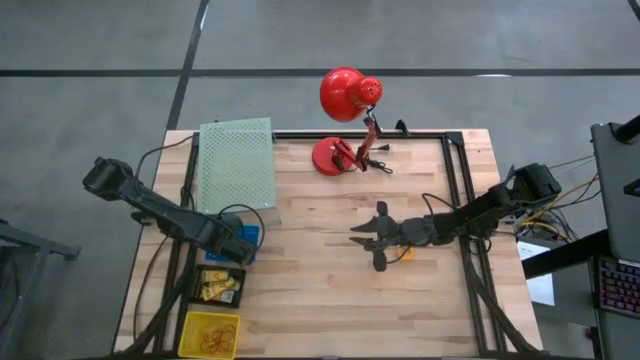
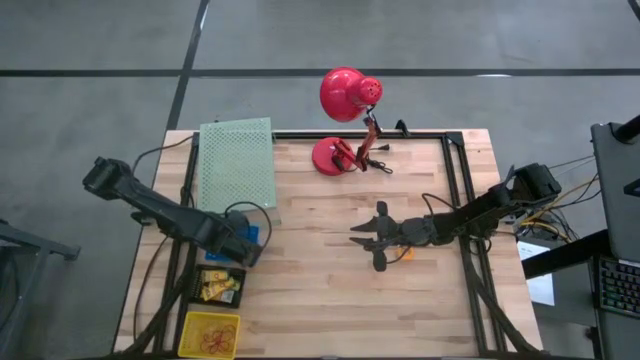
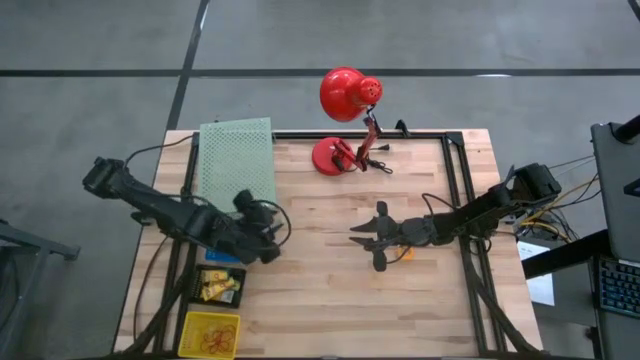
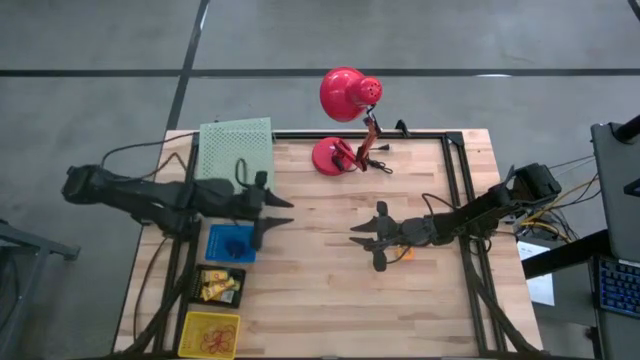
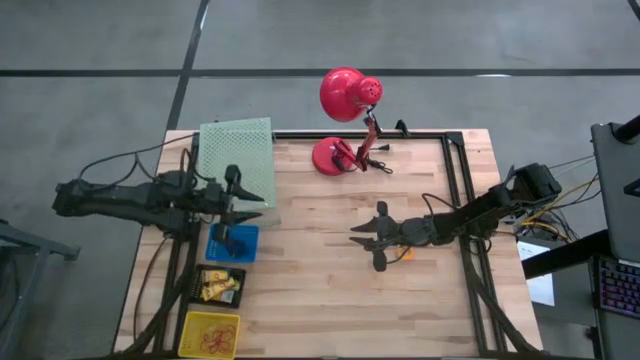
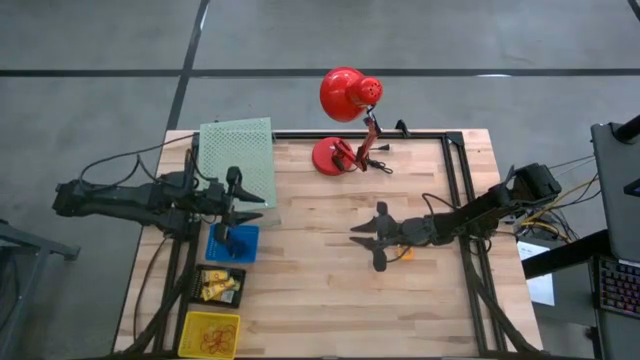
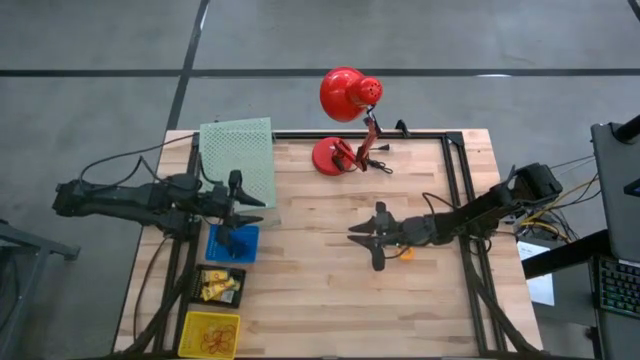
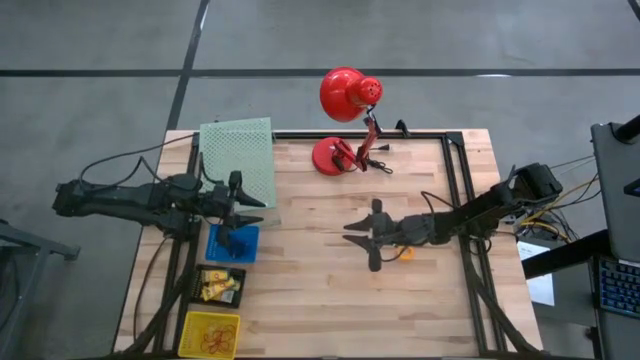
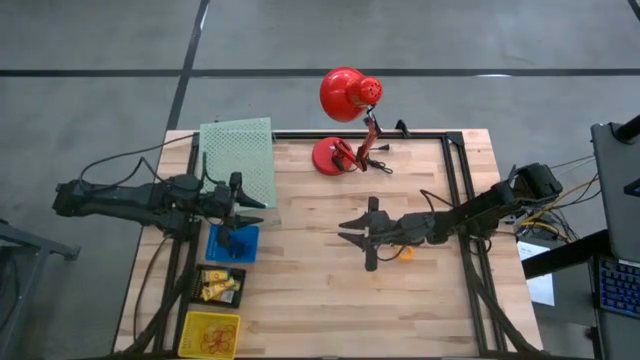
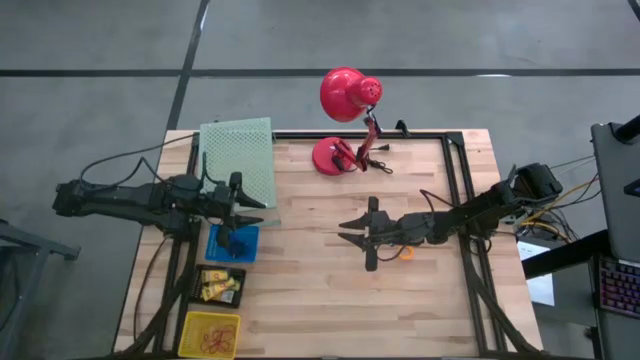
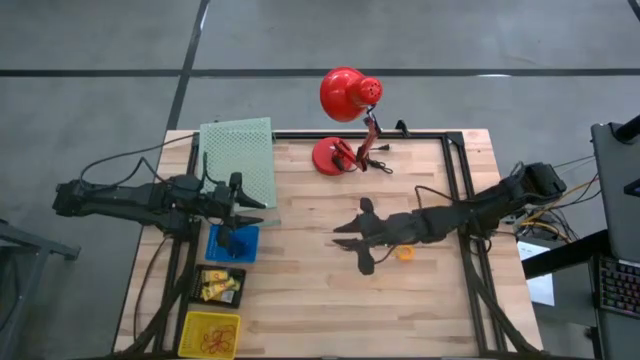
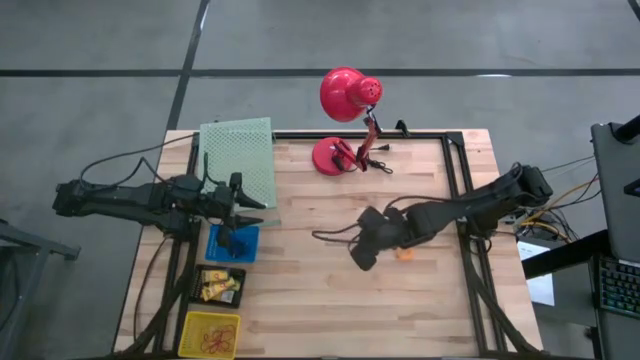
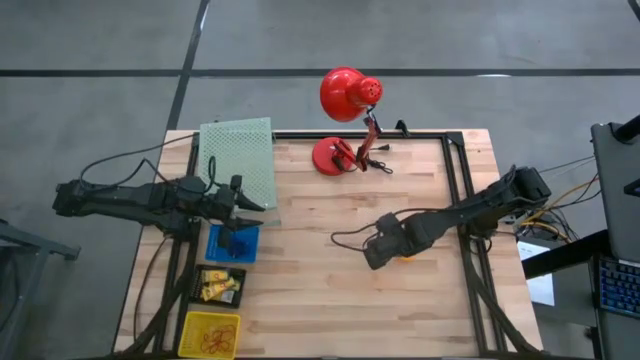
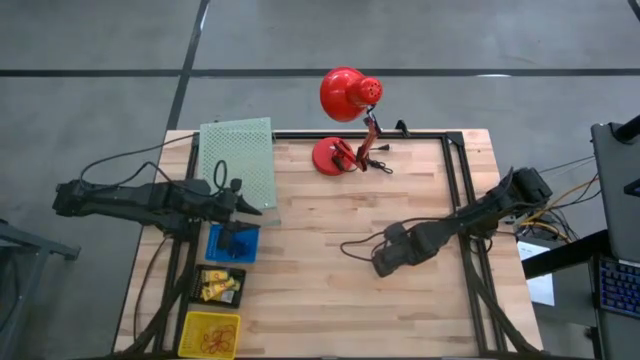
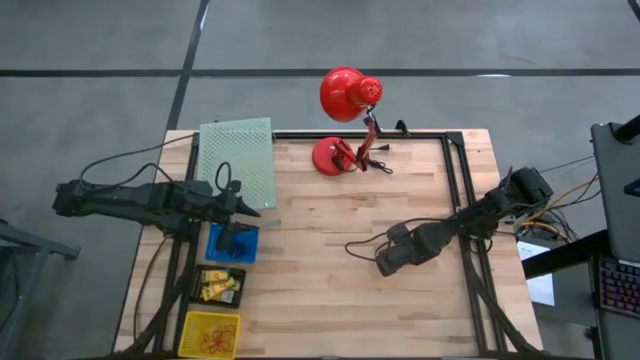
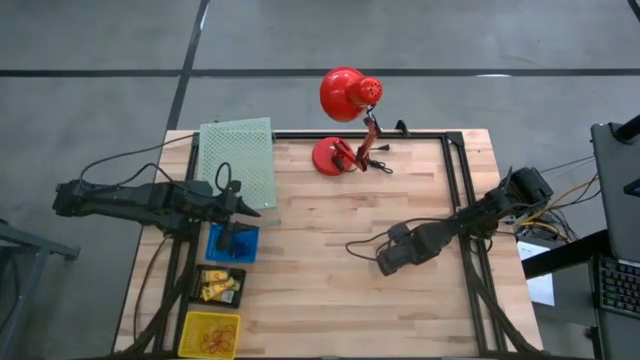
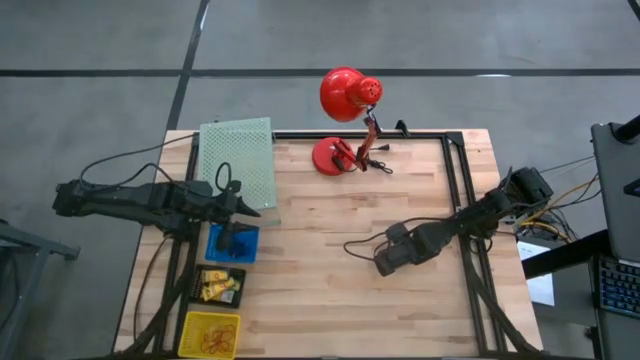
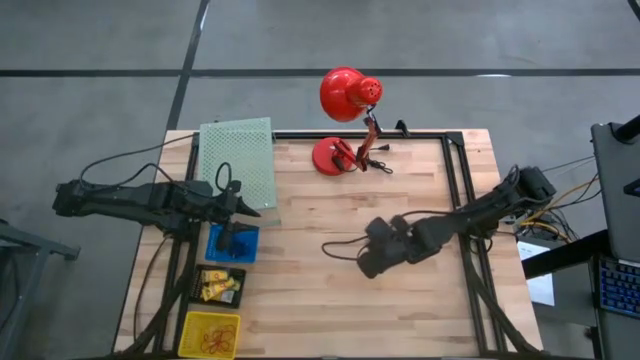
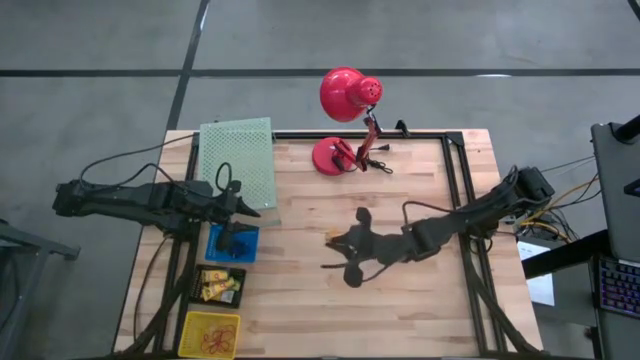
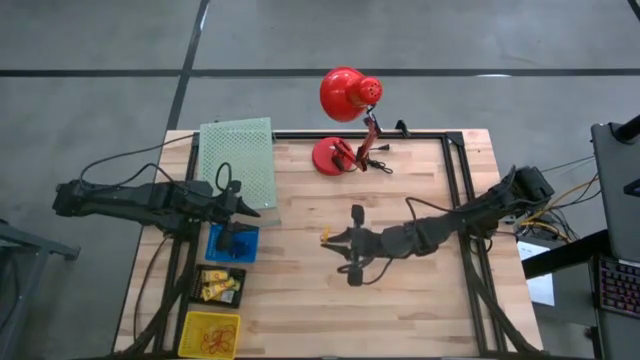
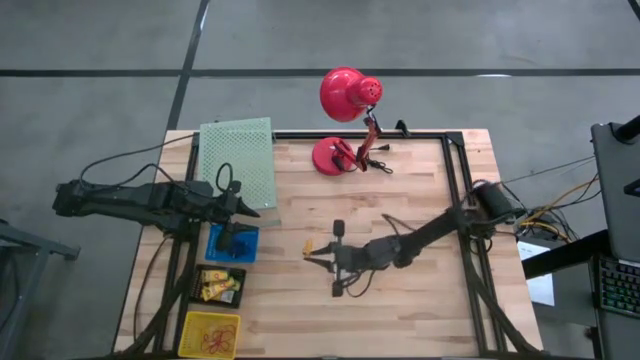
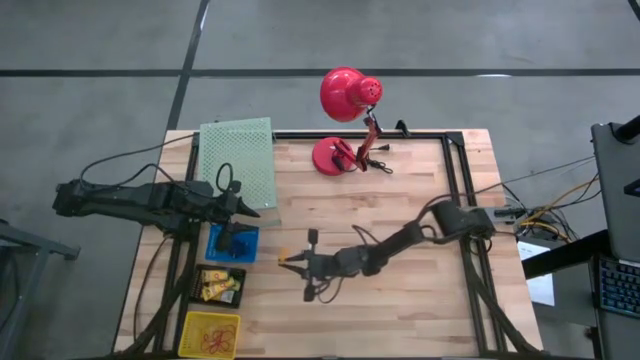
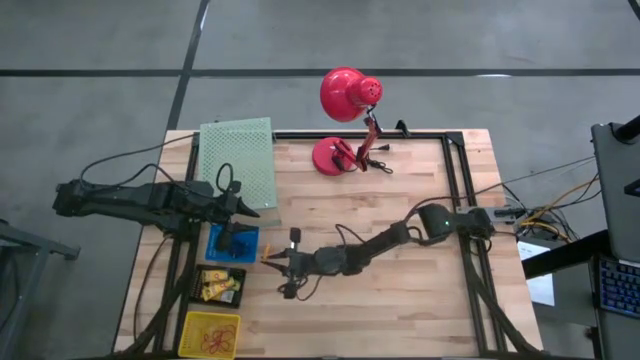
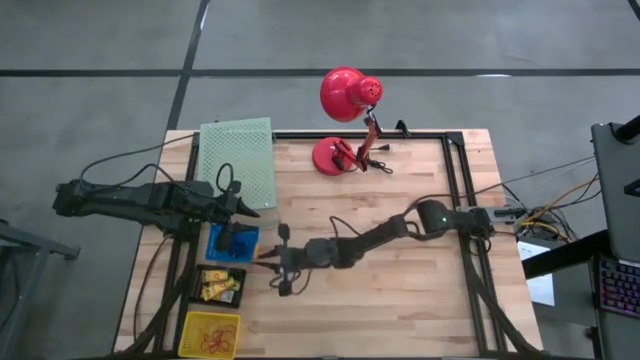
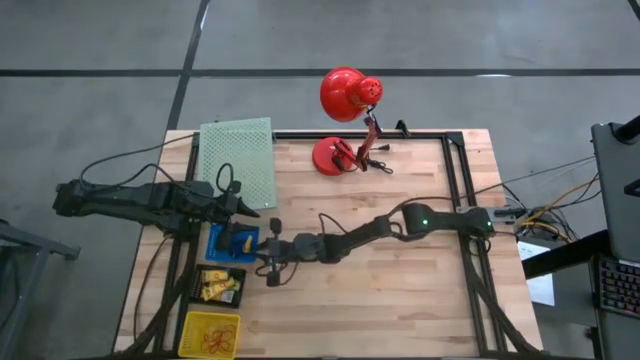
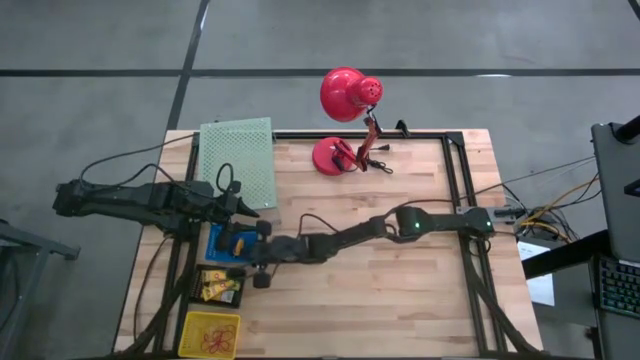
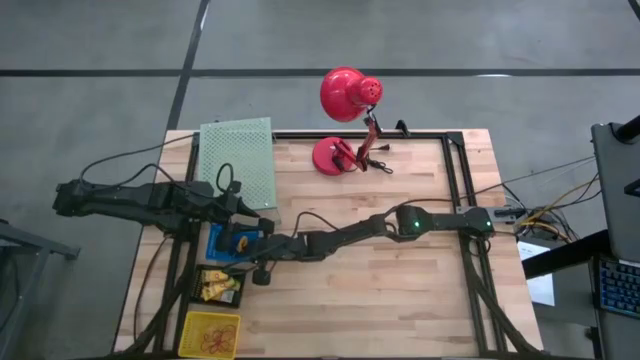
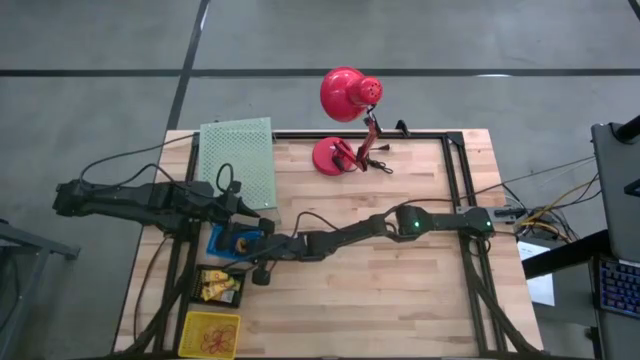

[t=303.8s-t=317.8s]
Task: Pick & Place Office Desk Supplies
Put the yellow spring rubber band into the blue bin

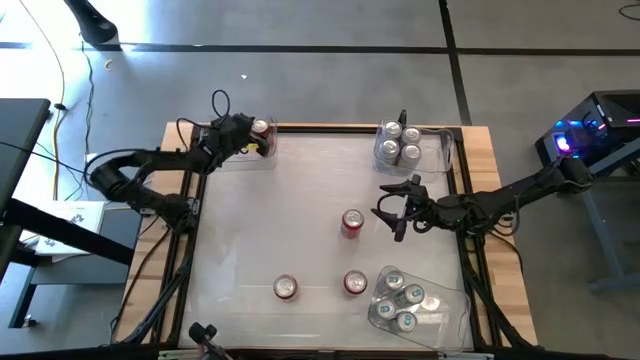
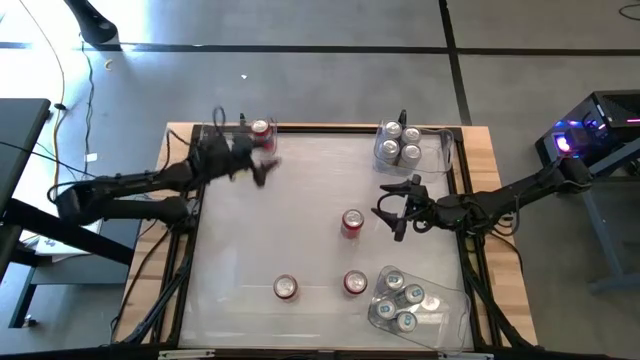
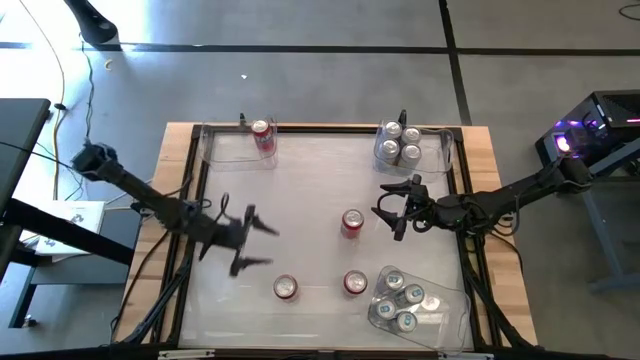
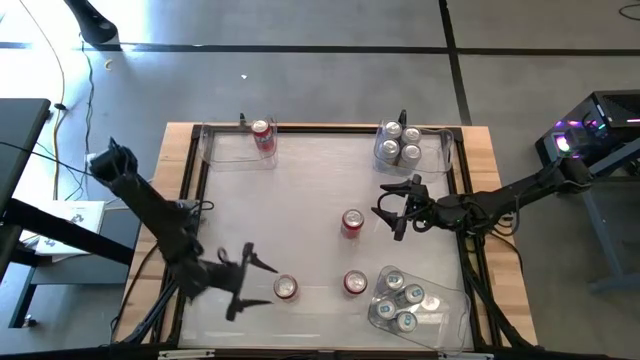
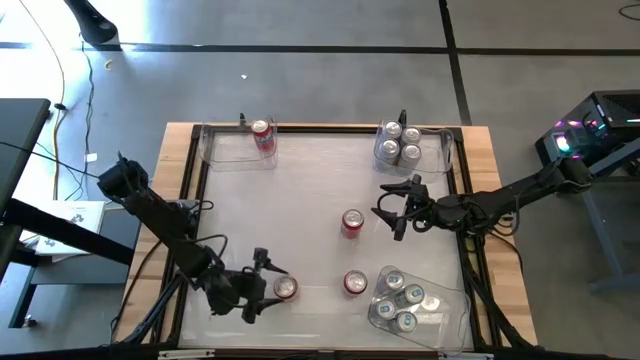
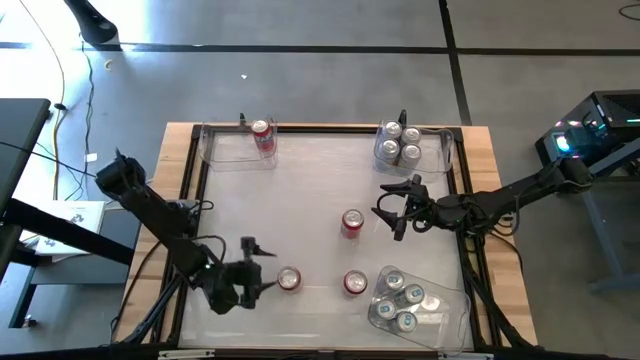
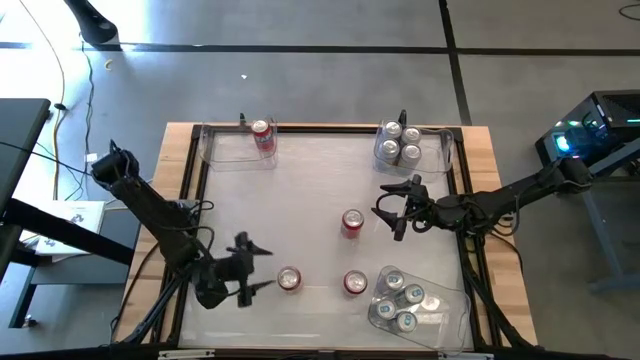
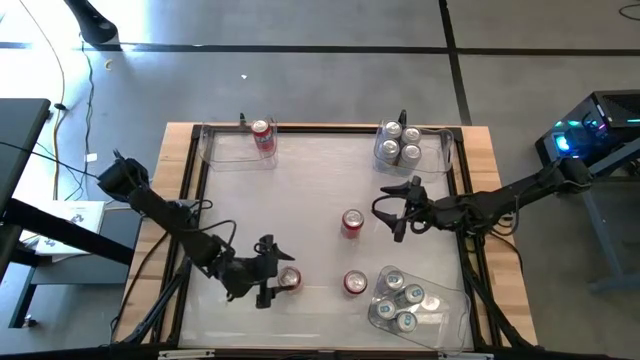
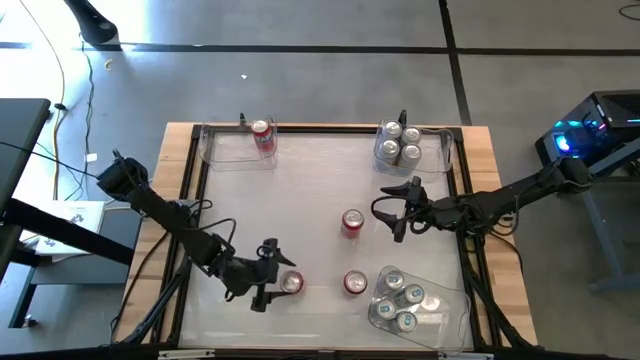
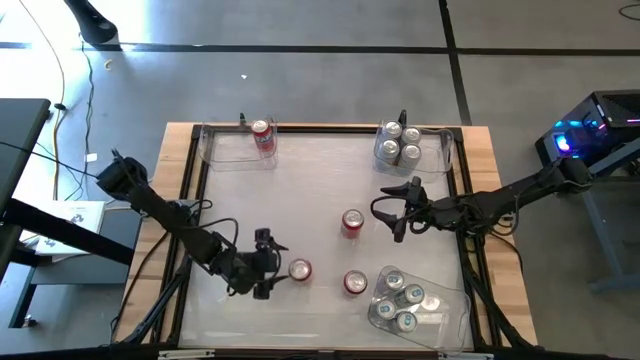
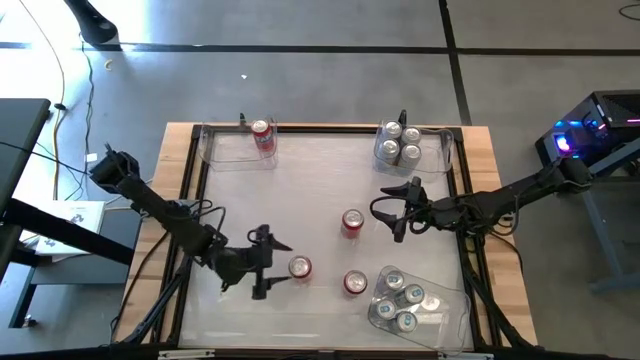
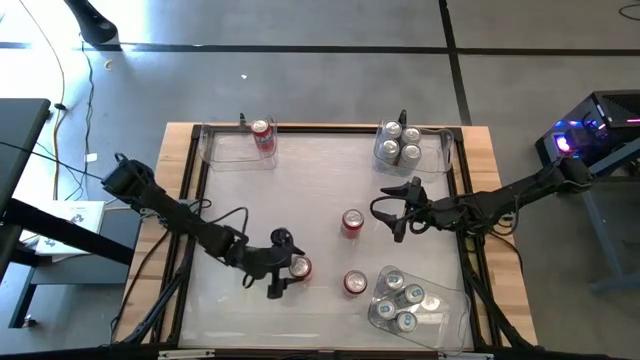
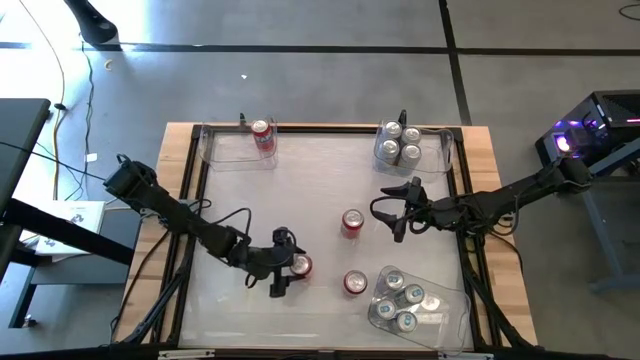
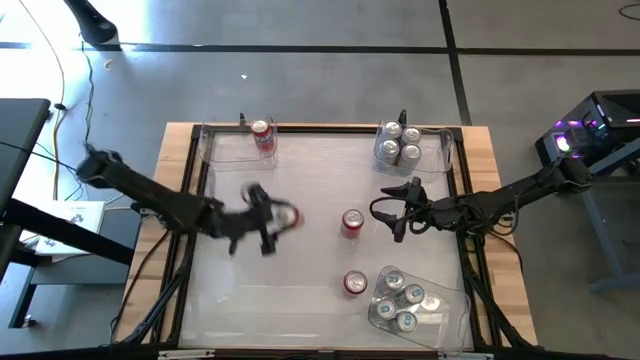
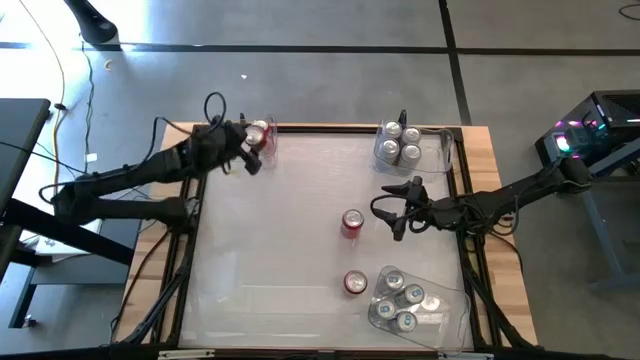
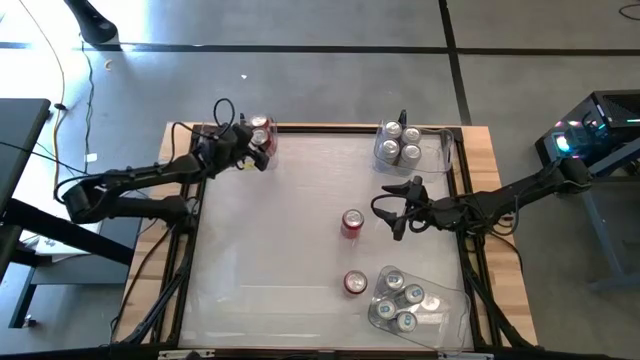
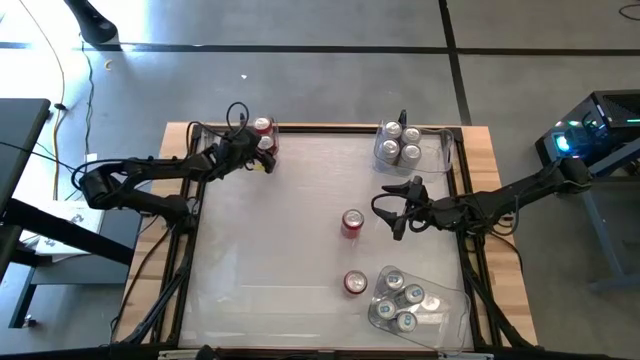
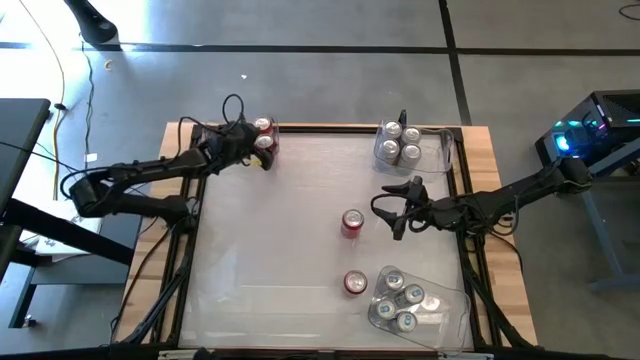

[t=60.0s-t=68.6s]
Task: Sort soda cans
Put the red soda can into the top left transparent bin
